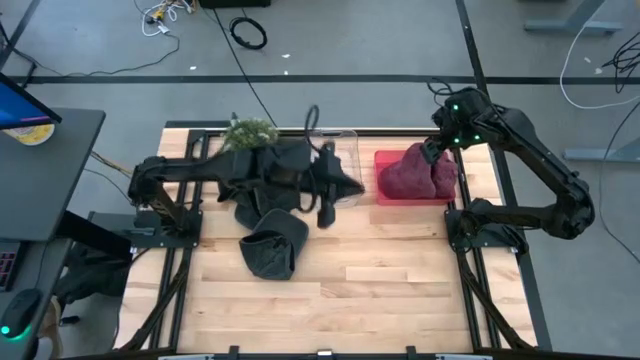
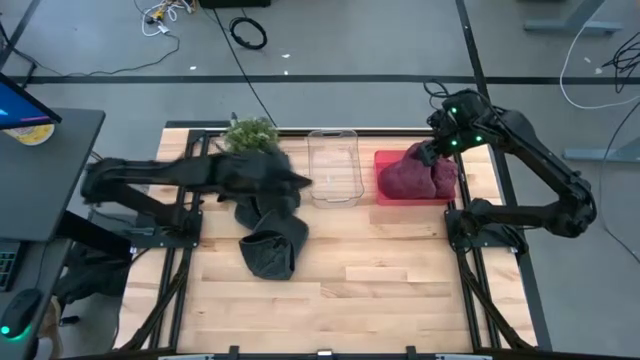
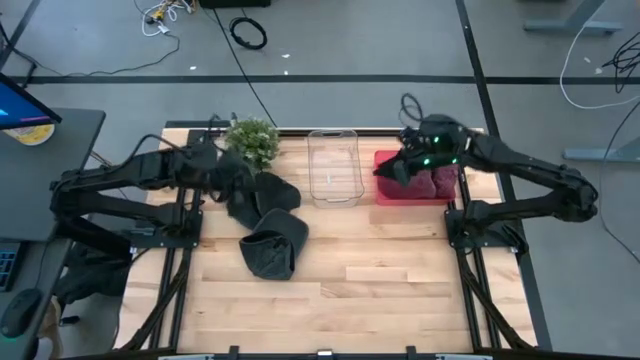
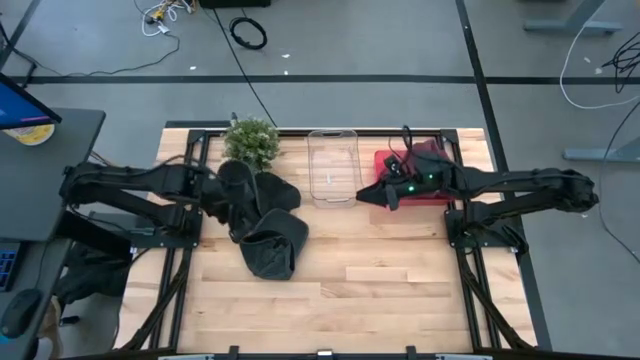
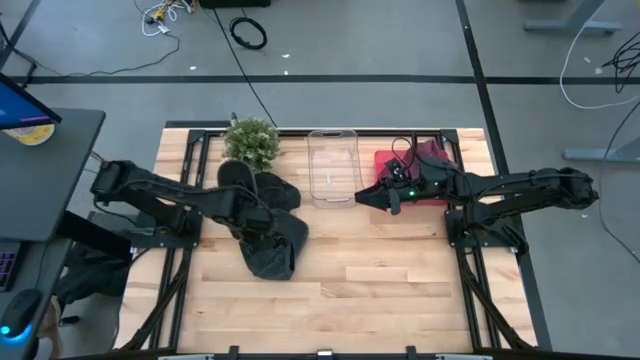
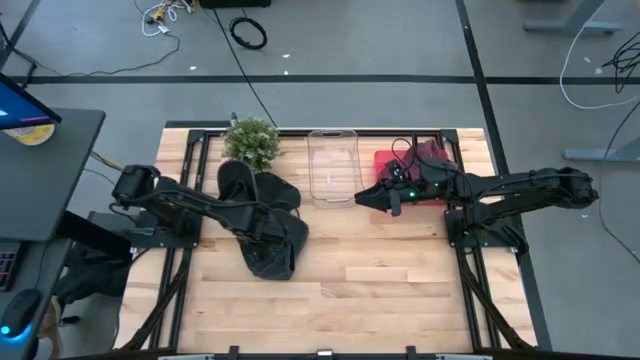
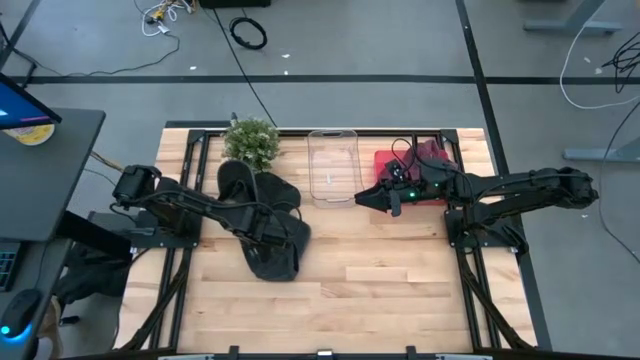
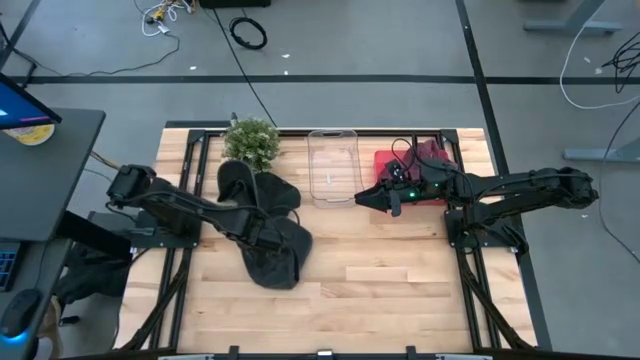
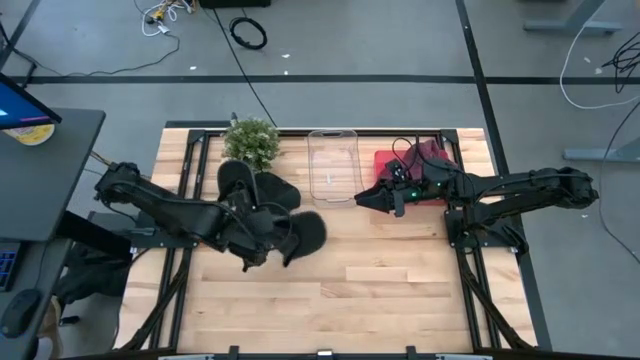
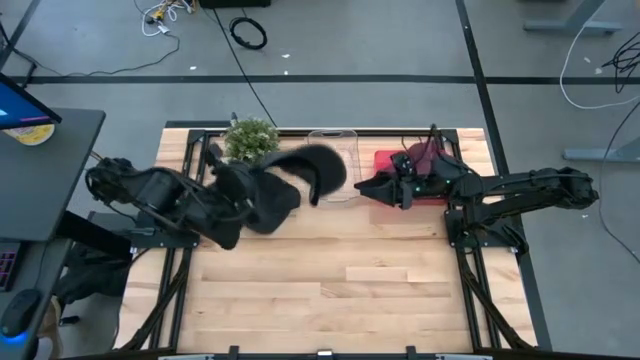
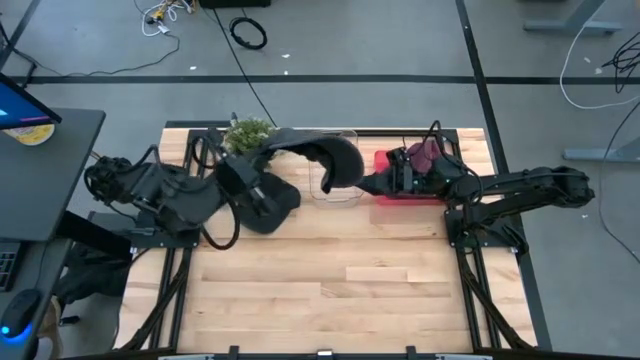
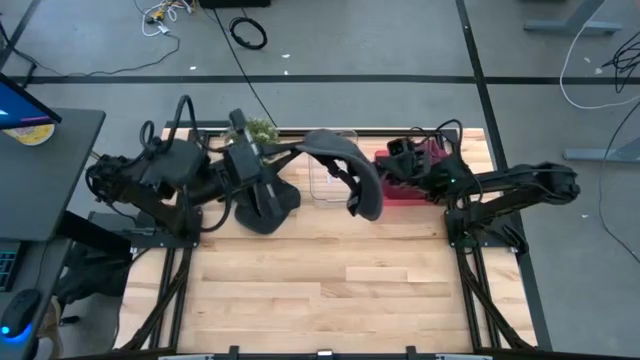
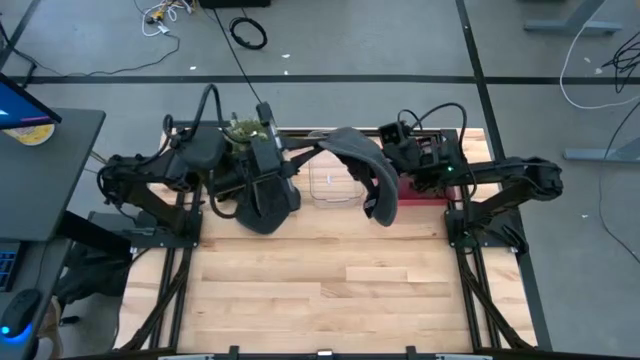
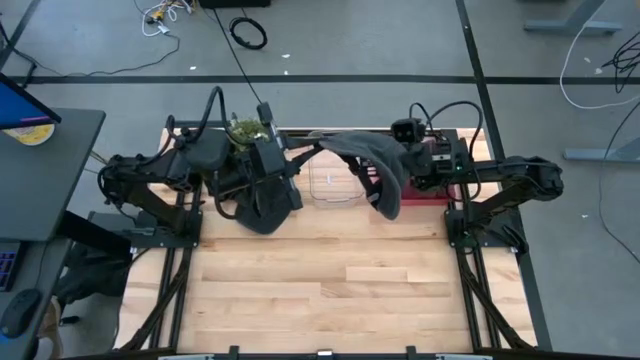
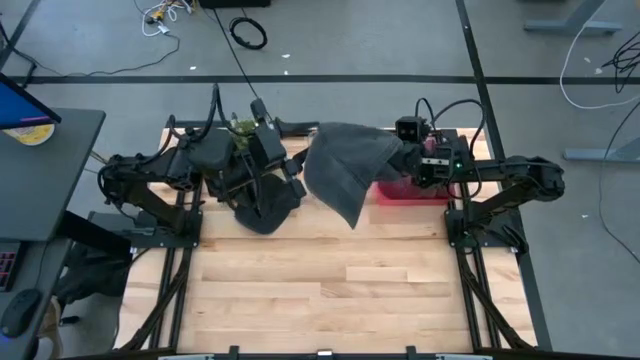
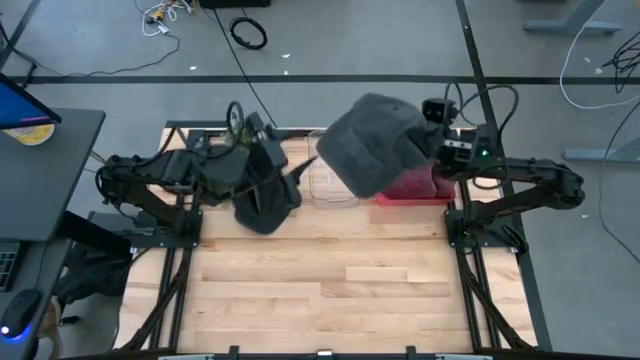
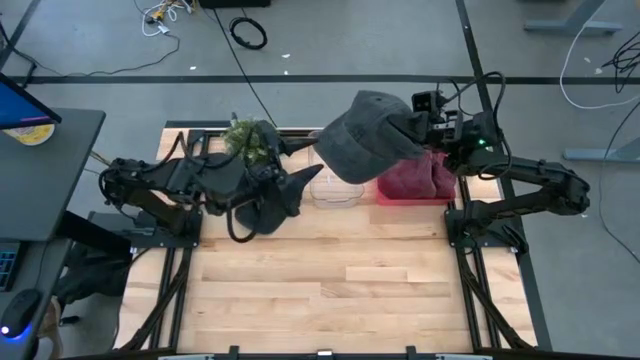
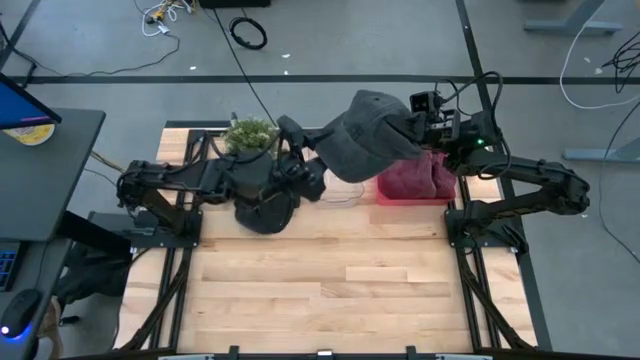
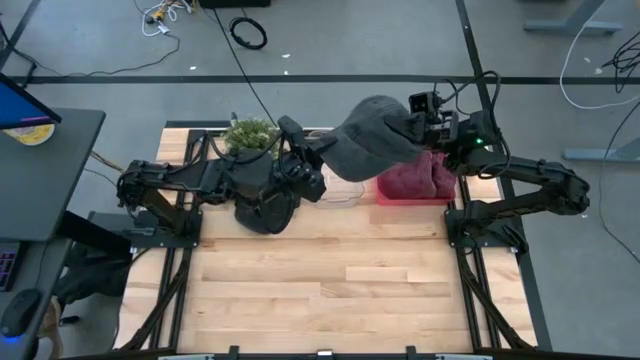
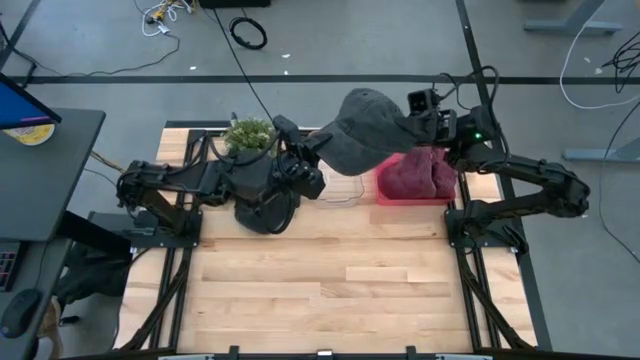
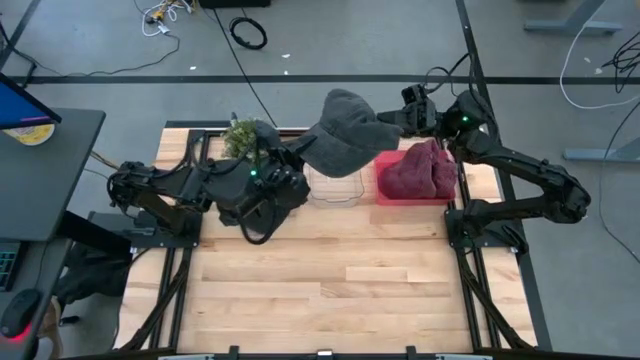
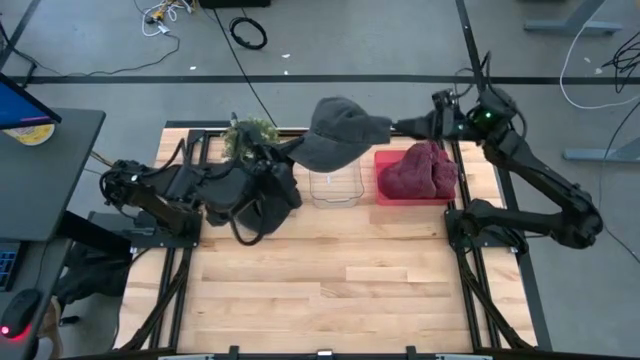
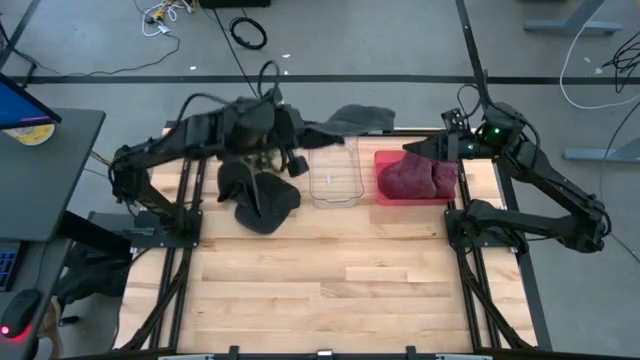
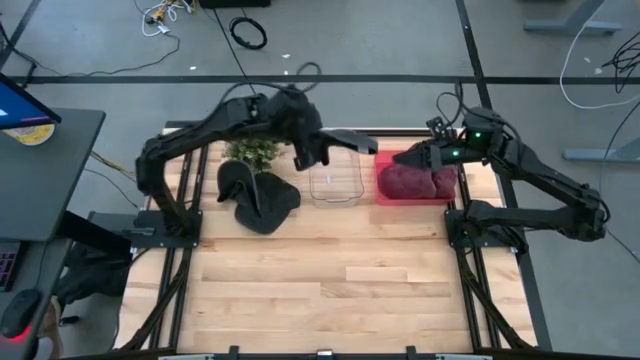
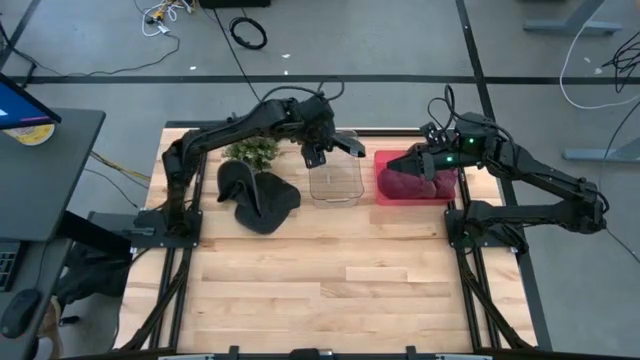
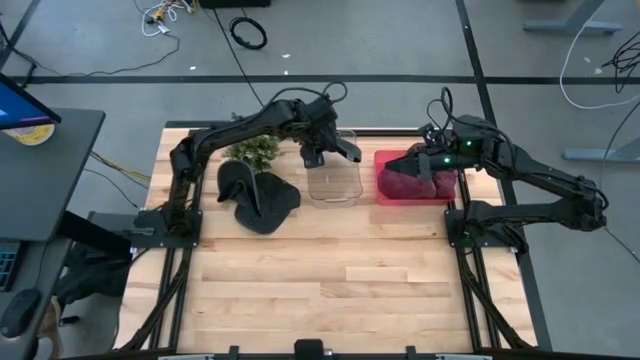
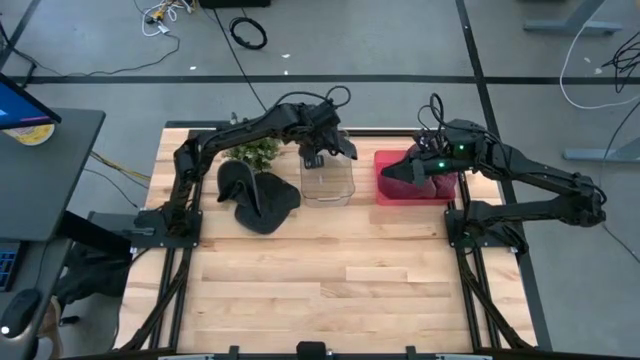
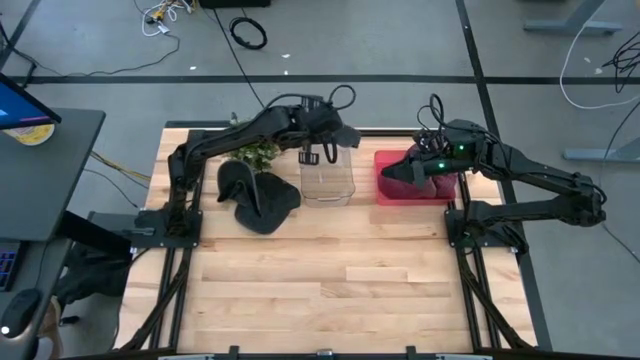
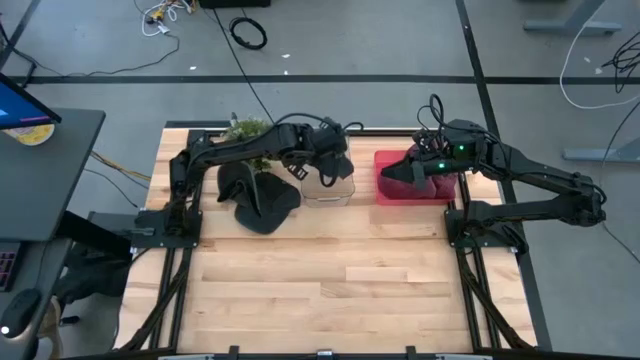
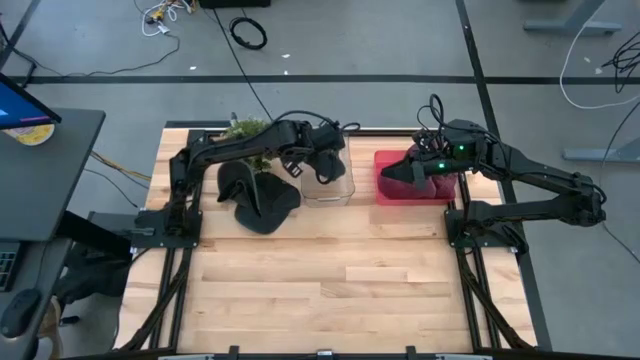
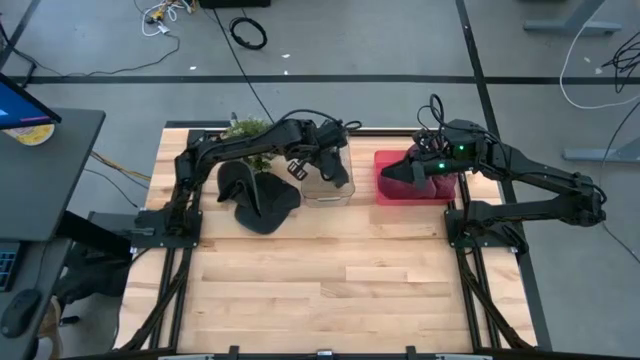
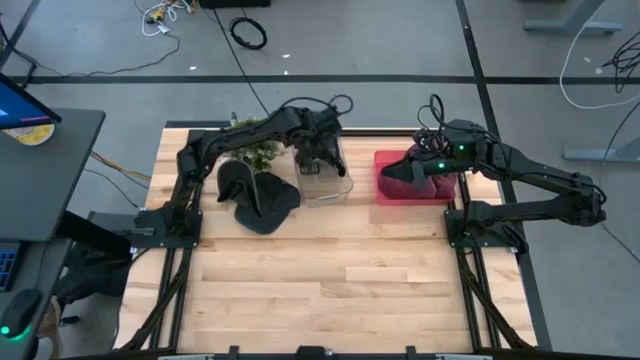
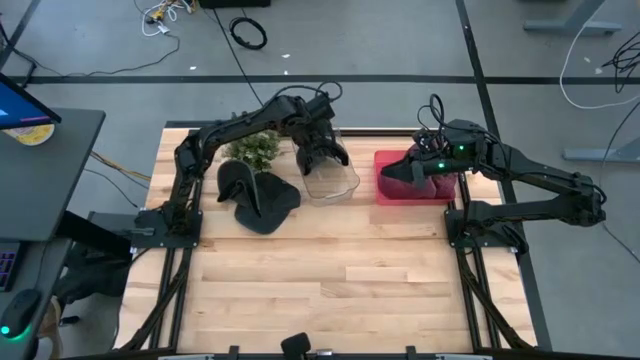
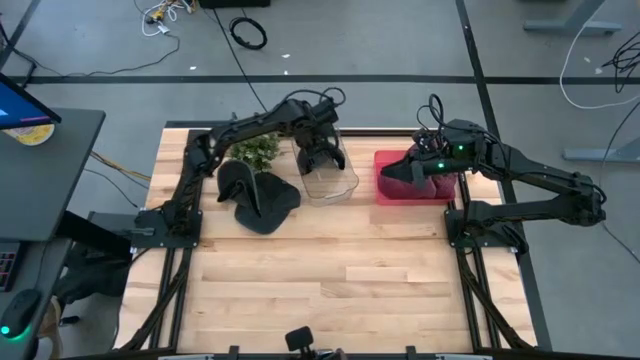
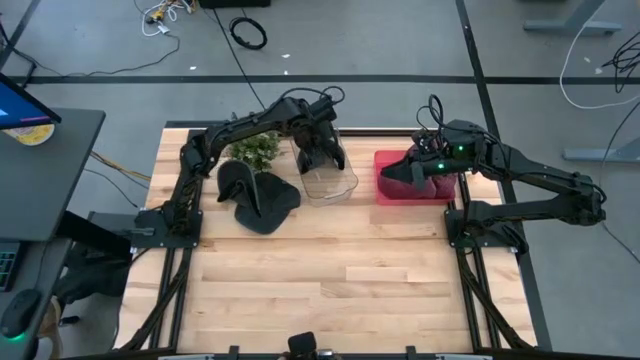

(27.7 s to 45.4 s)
Task: Pick & Place hat
Put the bottom black cap into the transparent bin
